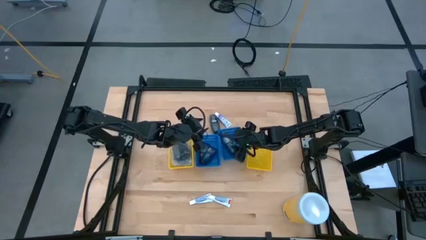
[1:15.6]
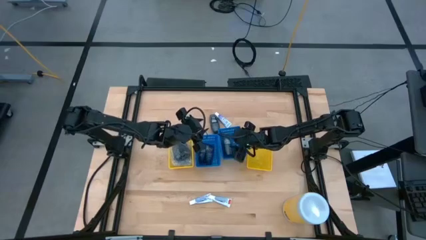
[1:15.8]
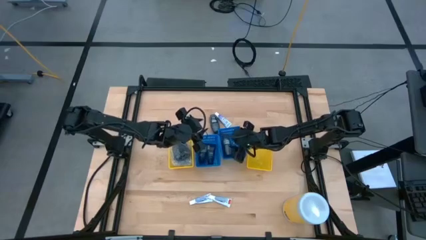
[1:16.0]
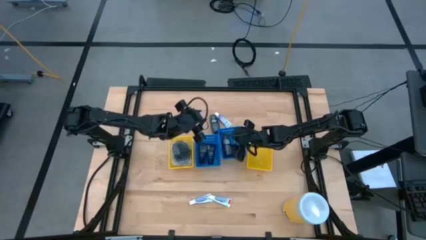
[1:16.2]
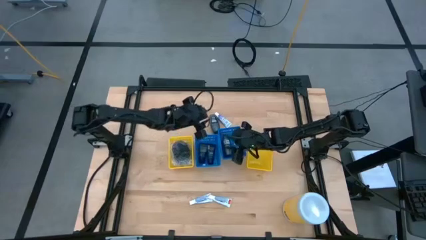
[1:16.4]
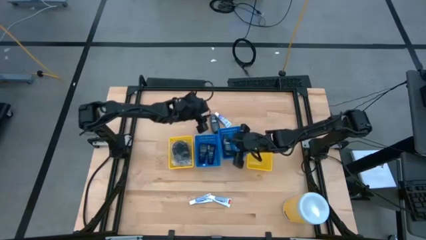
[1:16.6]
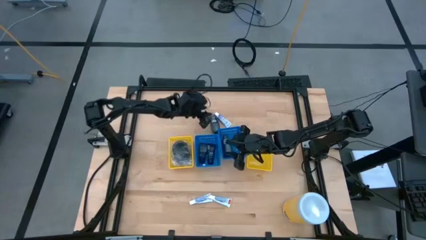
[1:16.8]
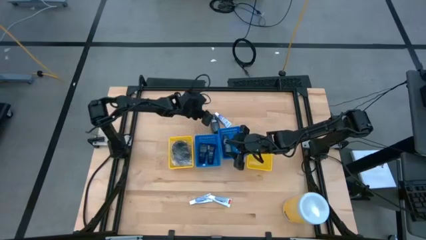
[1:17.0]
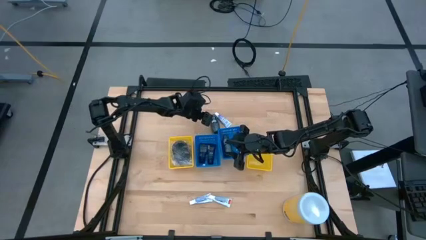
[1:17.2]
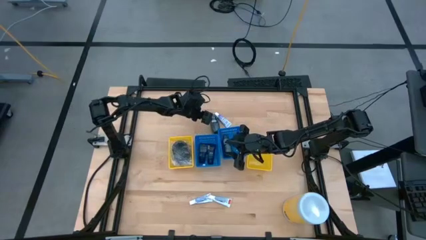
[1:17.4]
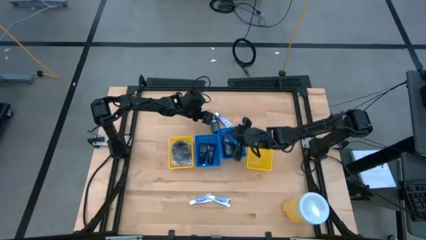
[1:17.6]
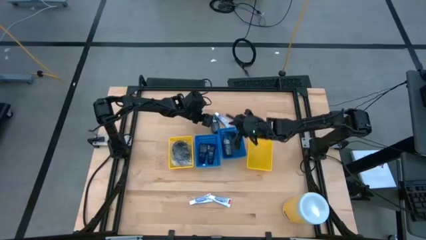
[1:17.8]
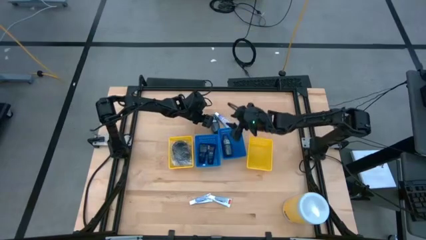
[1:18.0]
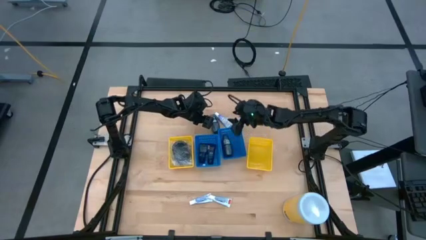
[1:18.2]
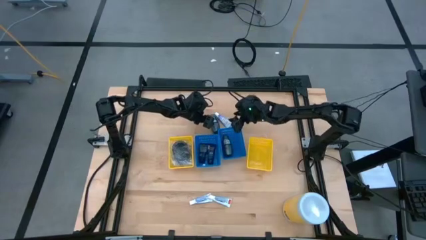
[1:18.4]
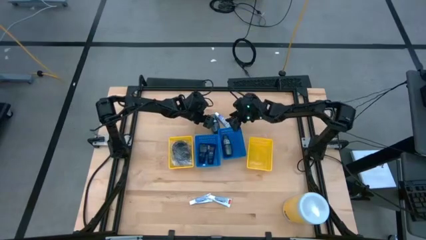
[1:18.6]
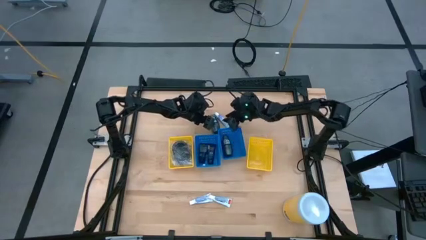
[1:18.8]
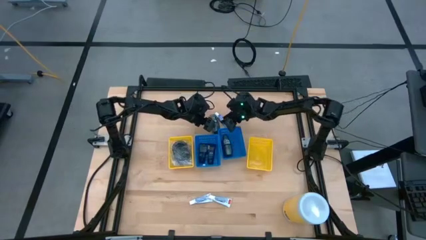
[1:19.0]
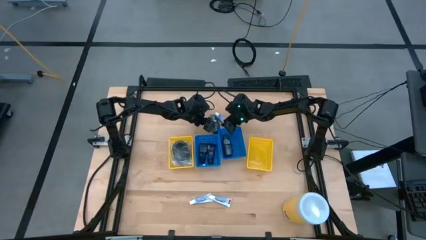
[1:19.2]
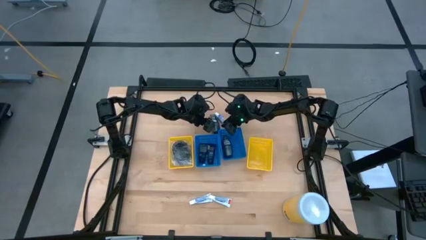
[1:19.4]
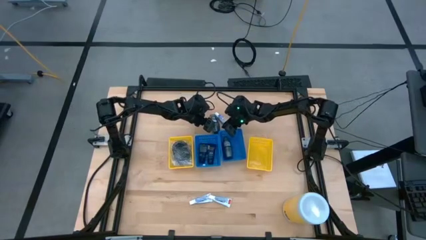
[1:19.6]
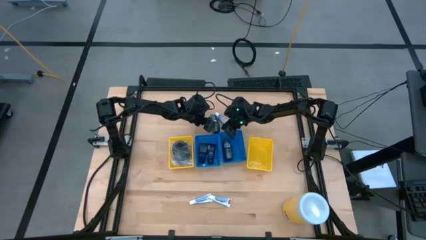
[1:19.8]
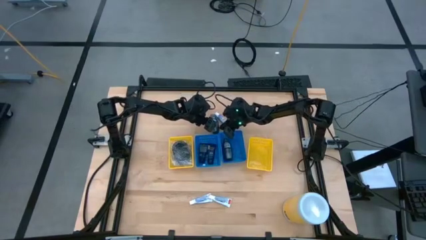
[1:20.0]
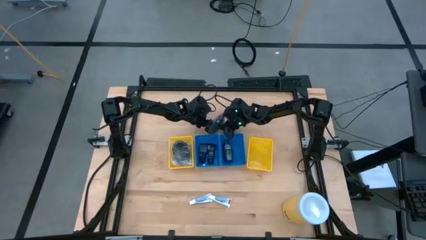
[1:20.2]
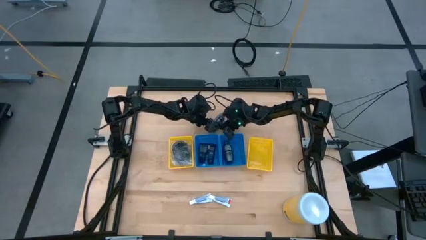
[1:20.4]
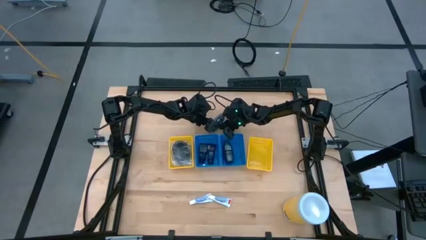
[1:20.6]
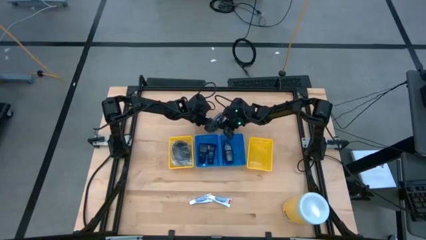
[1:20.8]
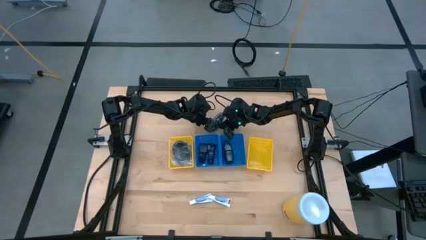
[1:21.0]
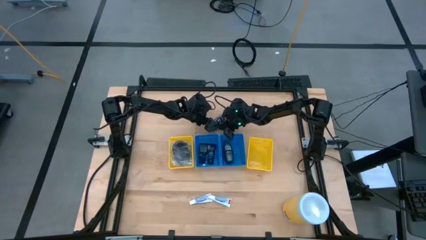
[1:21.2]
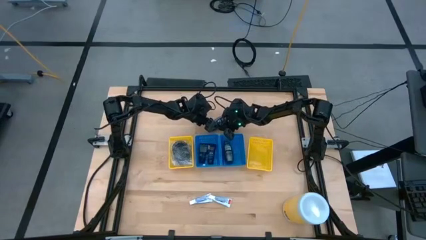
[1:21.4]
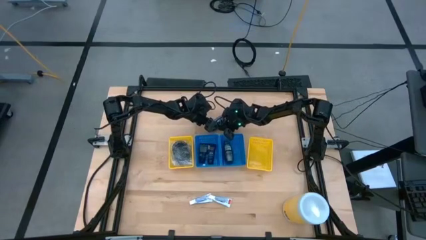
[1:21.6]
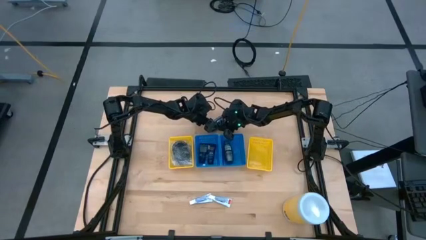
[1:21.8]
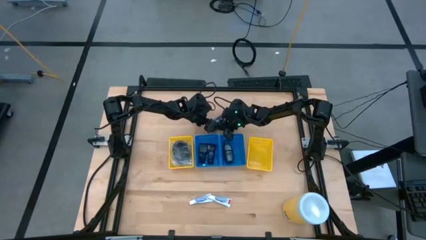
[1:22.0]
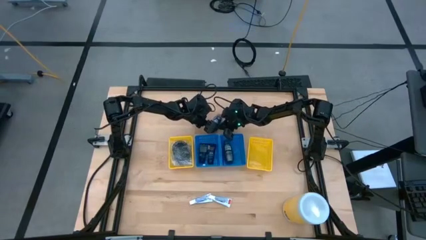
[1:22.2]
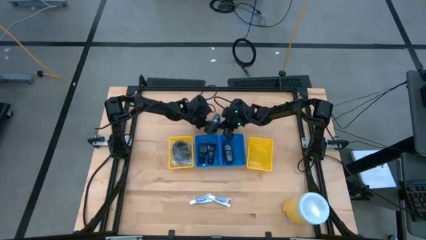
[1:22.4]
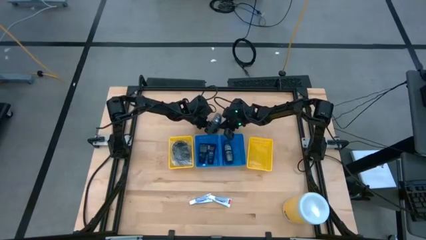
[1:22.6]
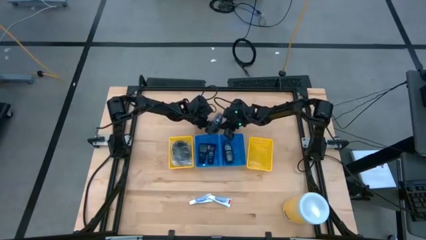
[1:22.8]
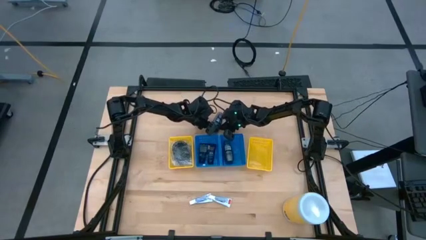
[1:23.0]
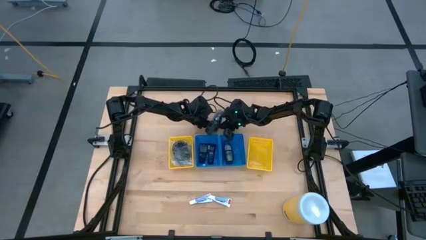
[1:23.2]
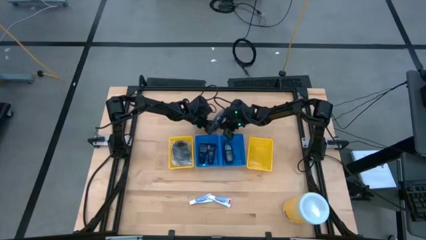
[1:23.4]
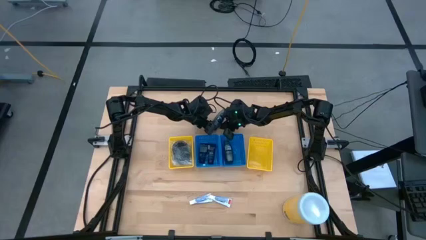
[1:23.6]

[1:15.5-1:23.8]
Task: Pick & Place Travel size toiletries
Put the gray roll-on into the right blue bin

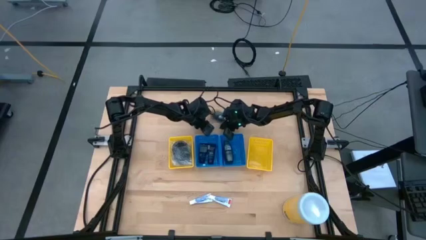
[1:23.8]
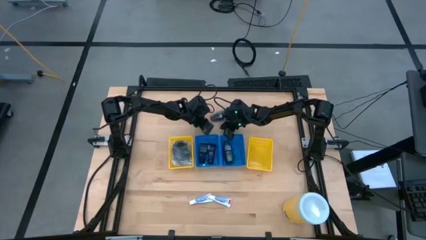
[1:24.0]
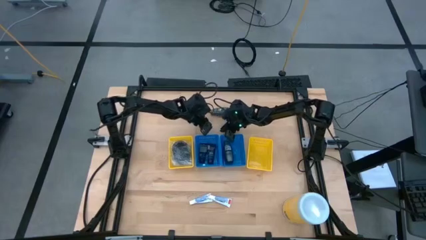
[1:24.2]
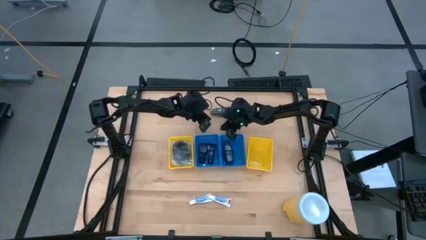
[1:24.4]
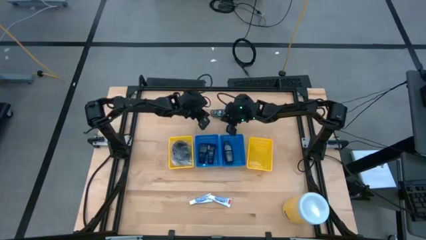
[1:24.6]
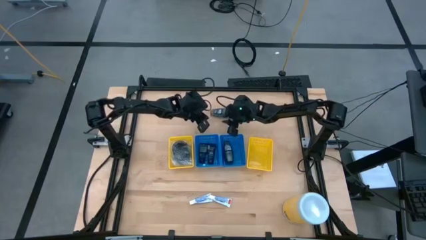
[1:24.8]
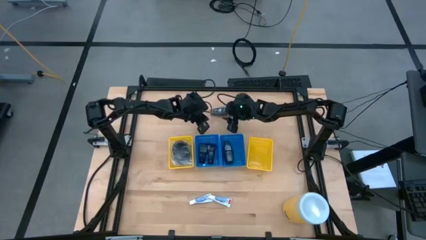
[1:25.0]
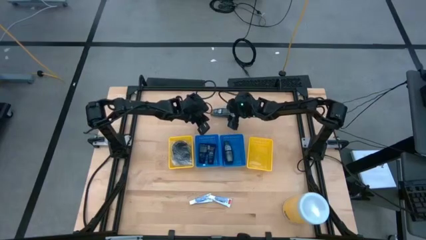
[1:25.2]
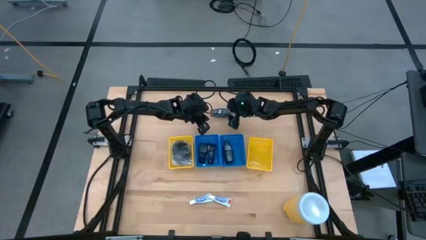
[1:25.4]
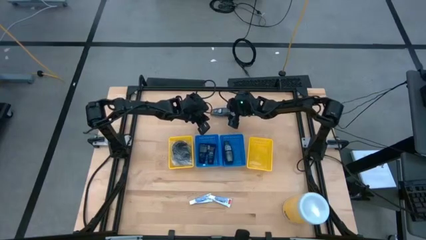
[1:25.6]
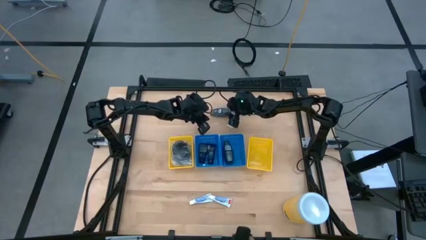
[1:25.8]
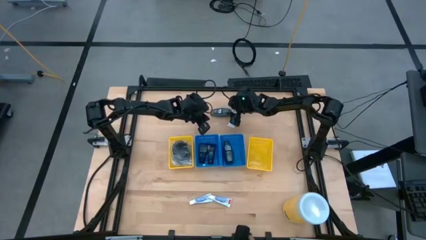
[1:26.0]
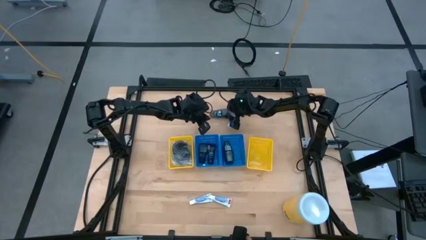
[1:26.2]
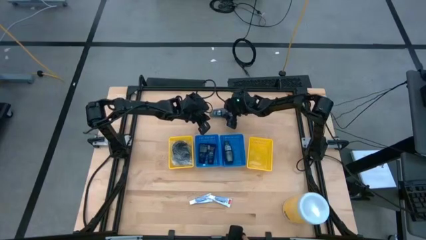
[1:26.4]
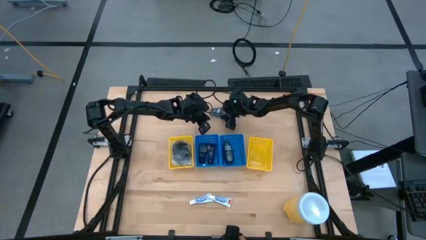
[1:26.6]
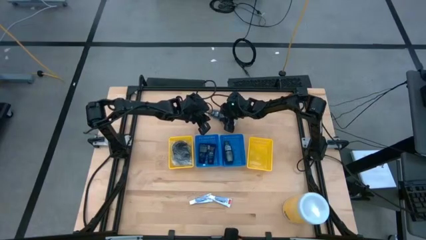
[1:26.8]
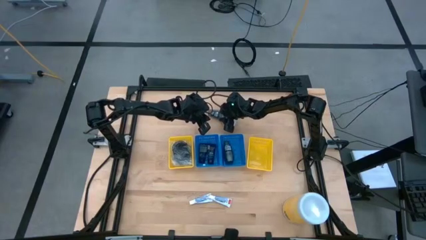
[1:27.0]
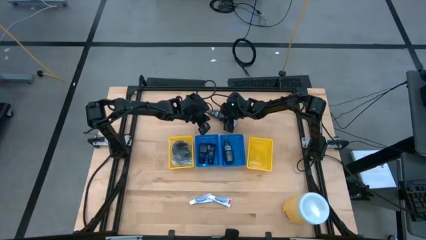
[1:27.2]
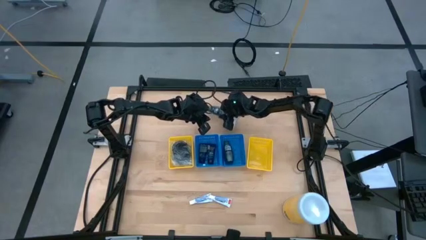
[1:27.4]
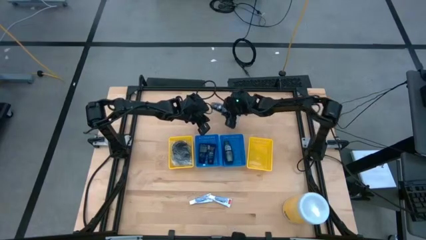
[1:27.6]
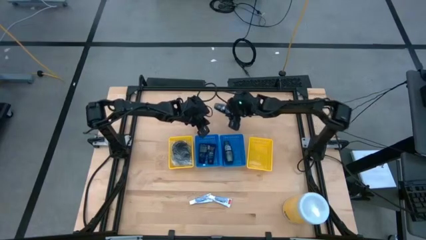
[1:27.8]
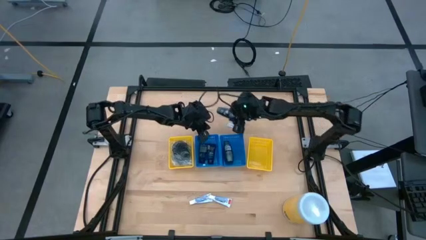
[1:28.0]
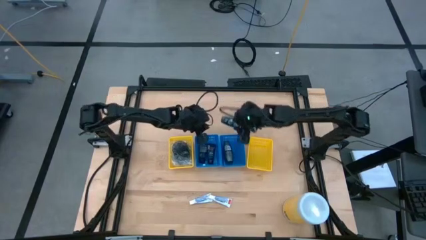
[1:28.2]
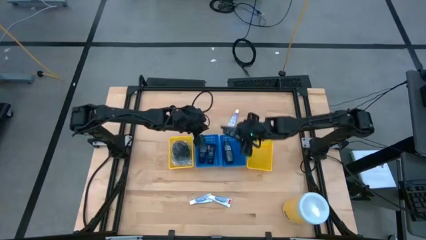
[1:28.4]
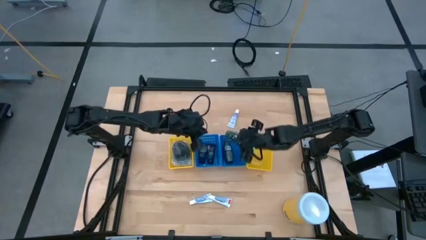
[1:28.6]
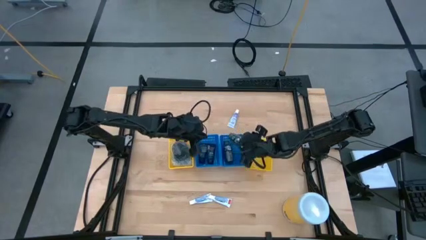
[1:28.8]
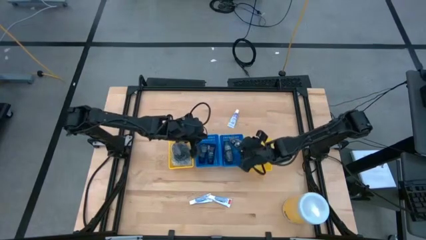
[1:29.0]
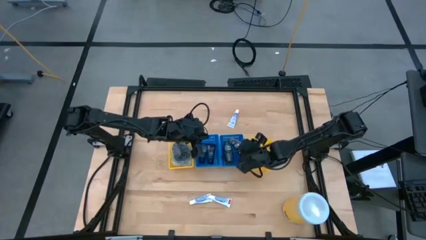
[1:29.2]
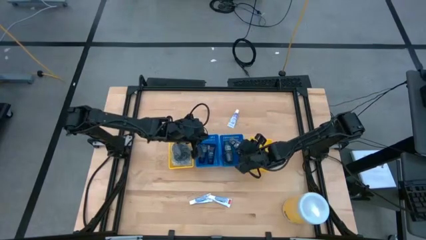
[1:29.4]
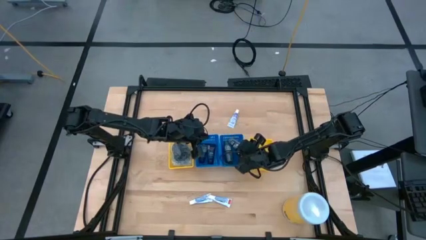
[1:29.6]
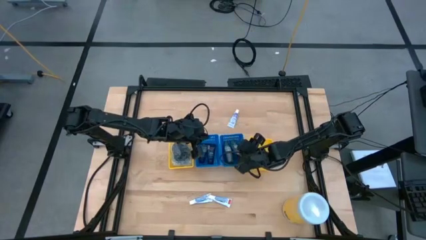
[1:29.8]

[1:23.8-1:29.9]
Put the gray roll-on into the right blue bin
